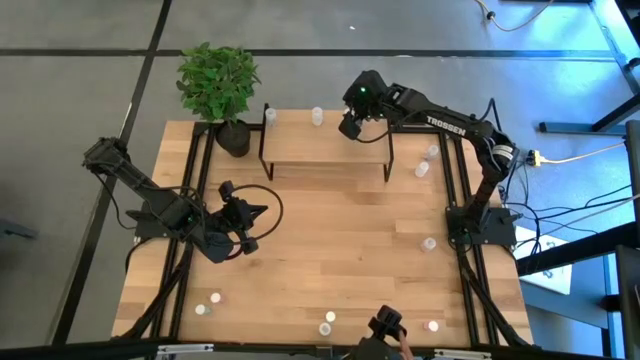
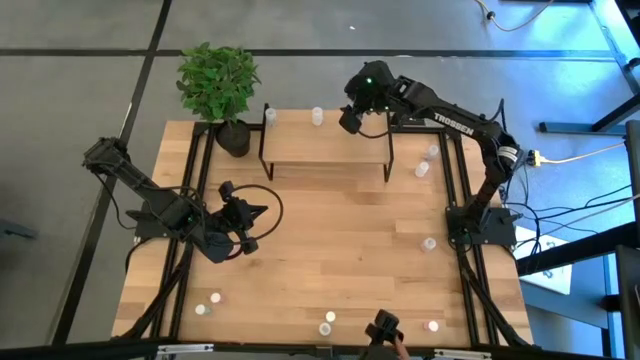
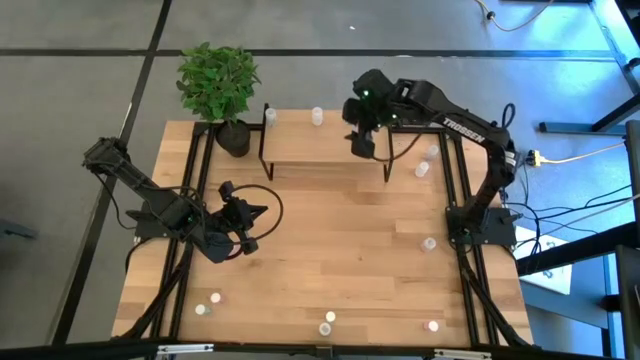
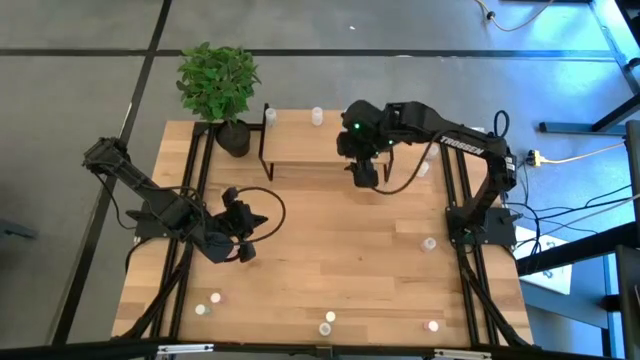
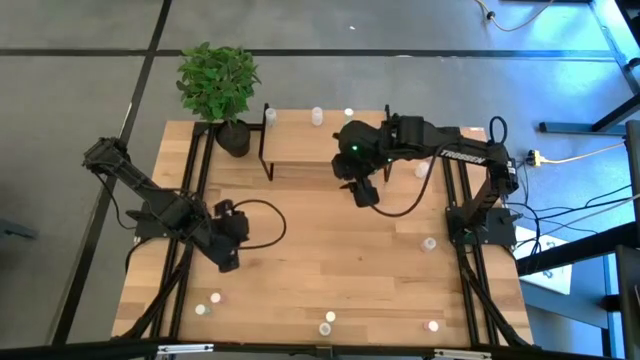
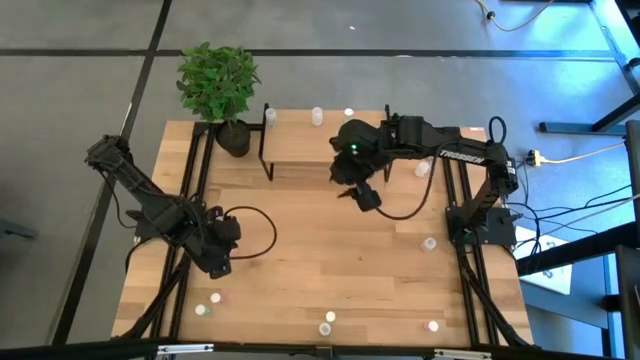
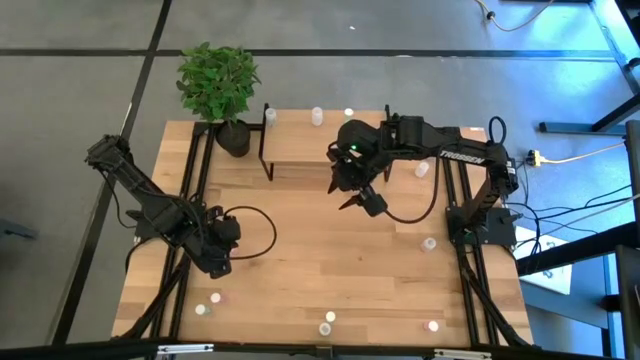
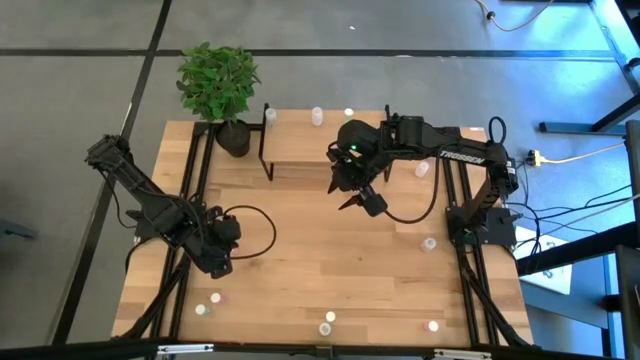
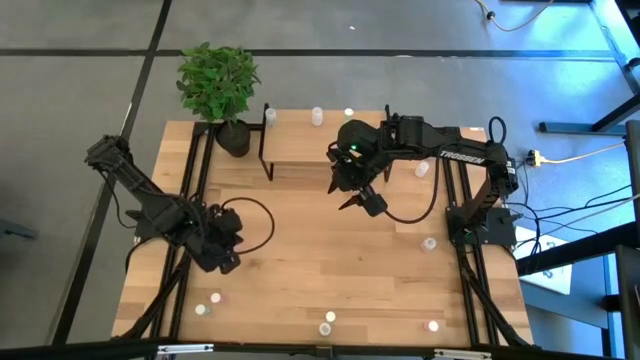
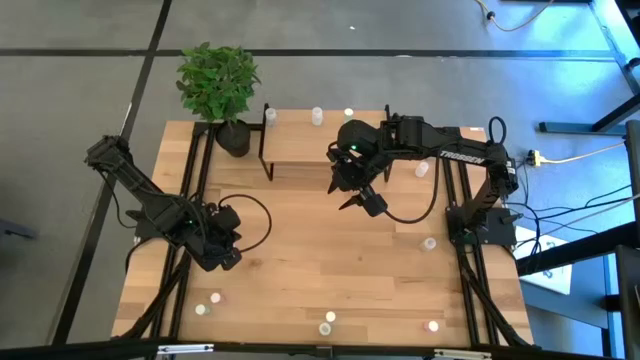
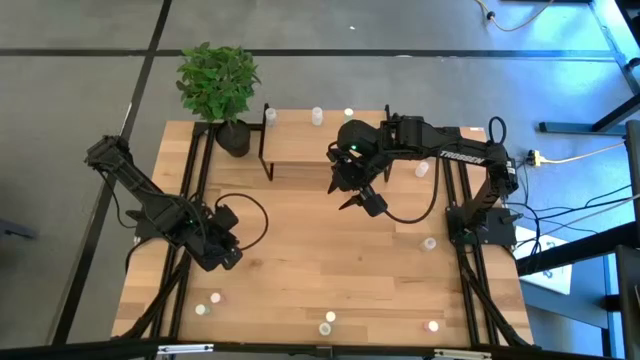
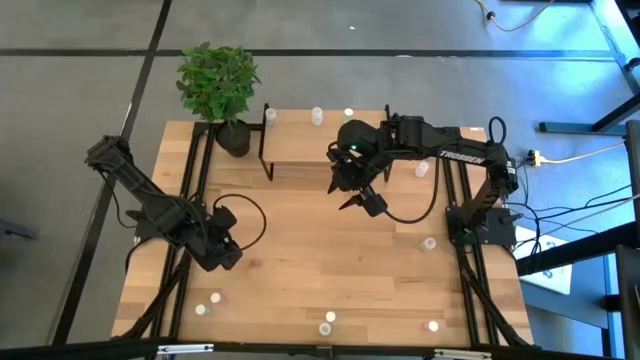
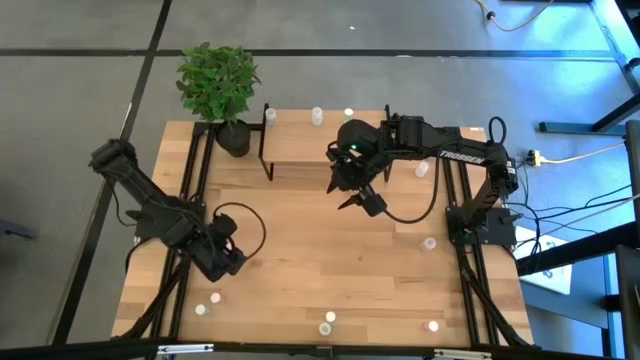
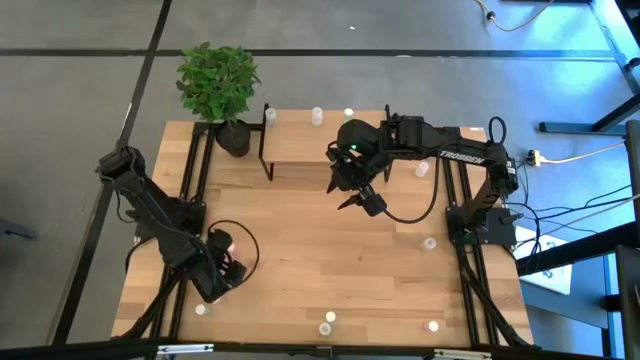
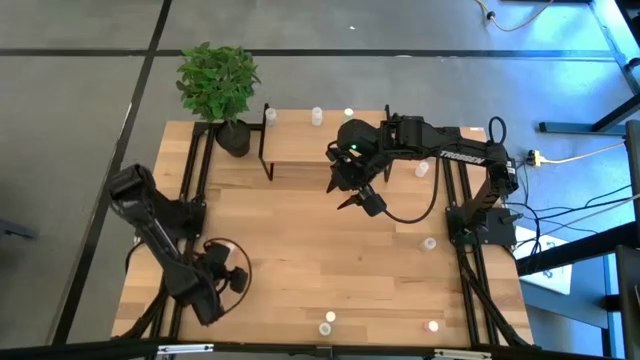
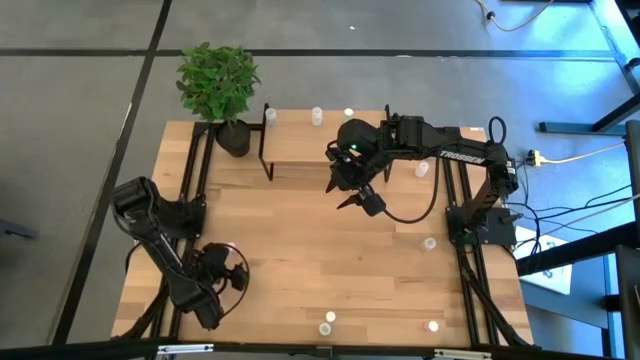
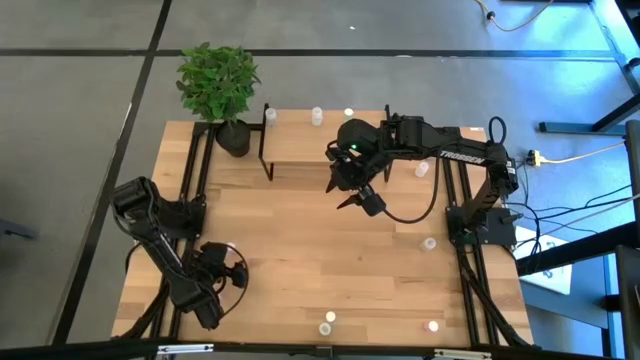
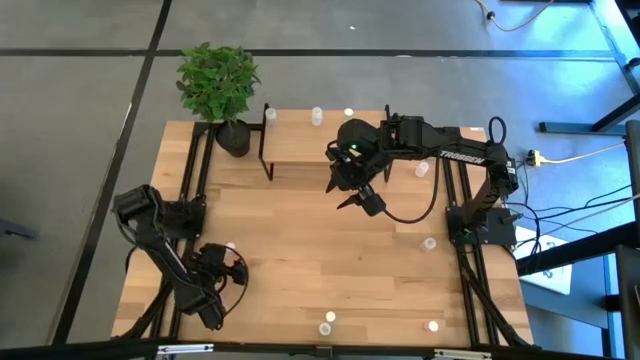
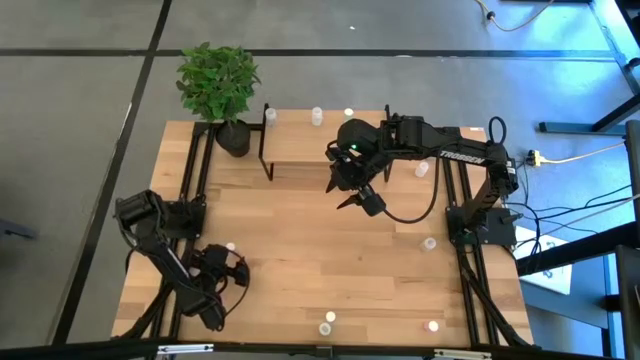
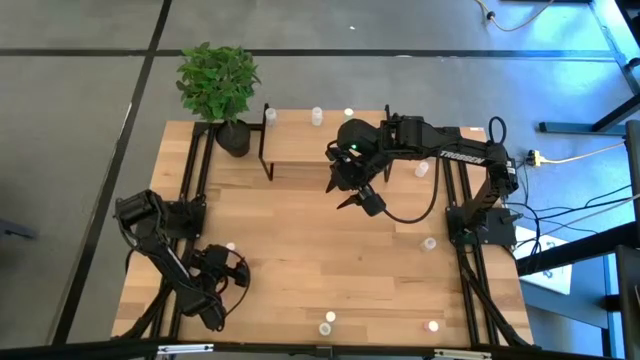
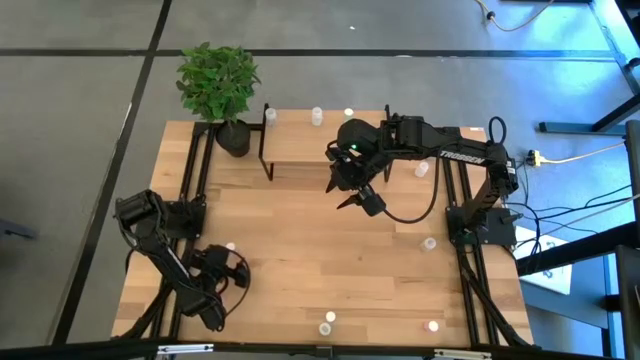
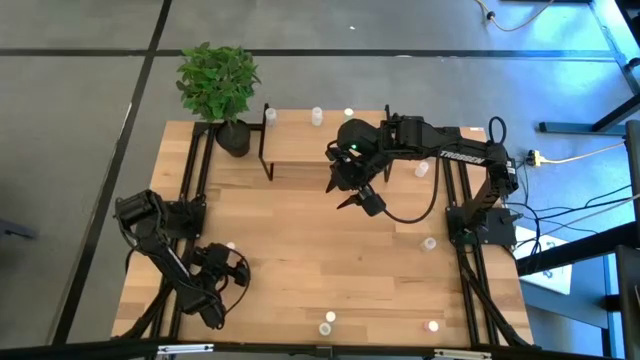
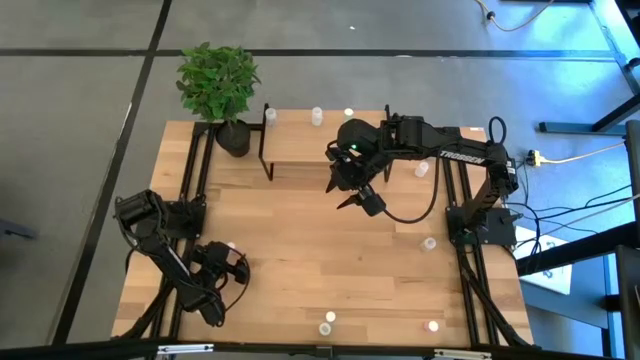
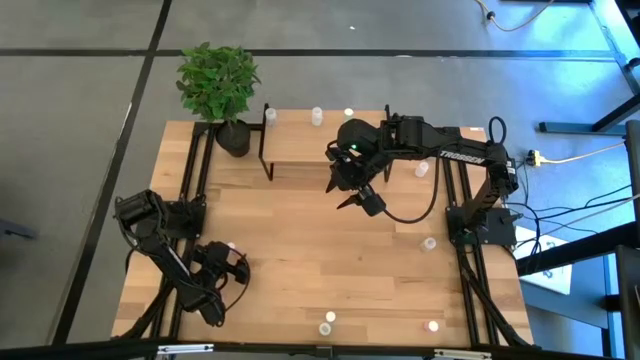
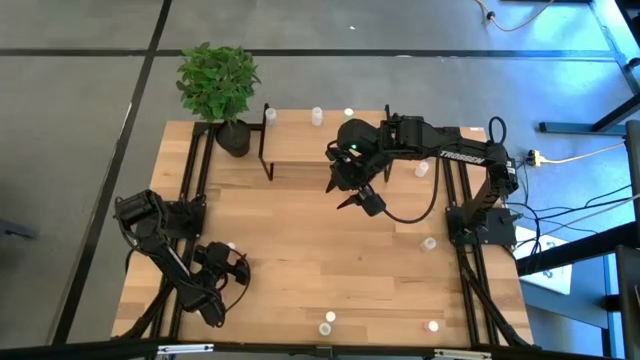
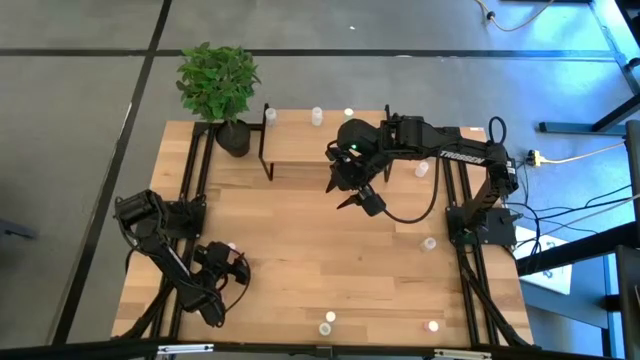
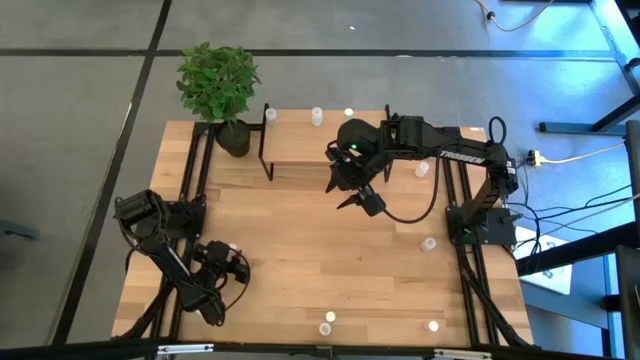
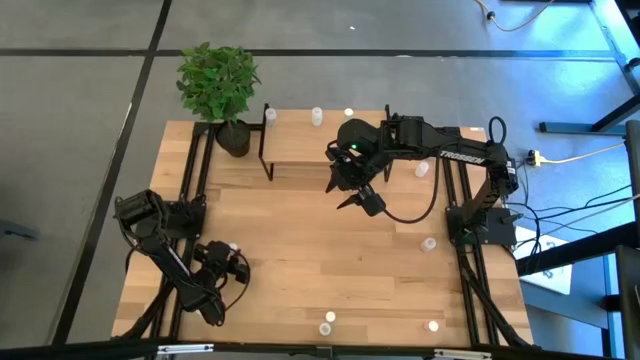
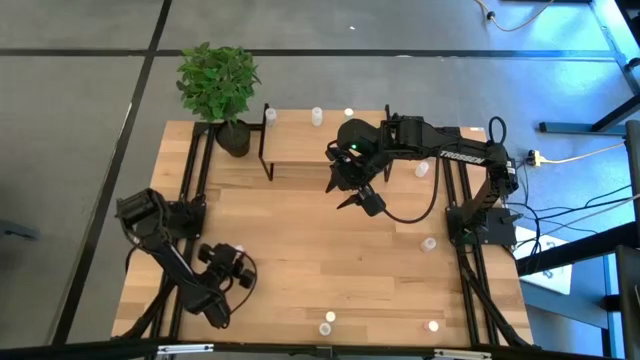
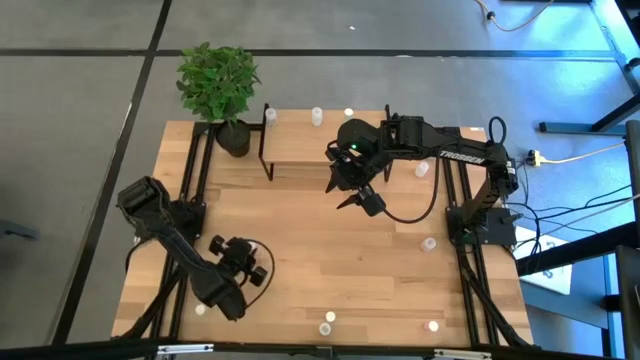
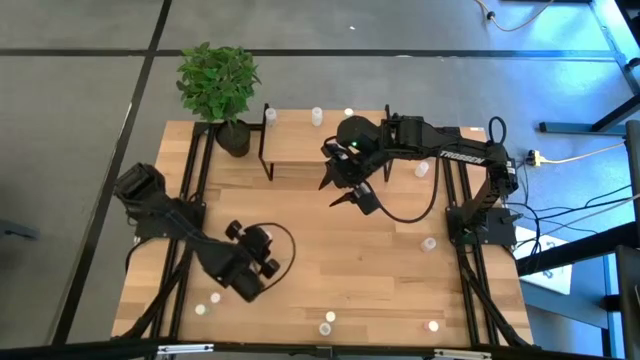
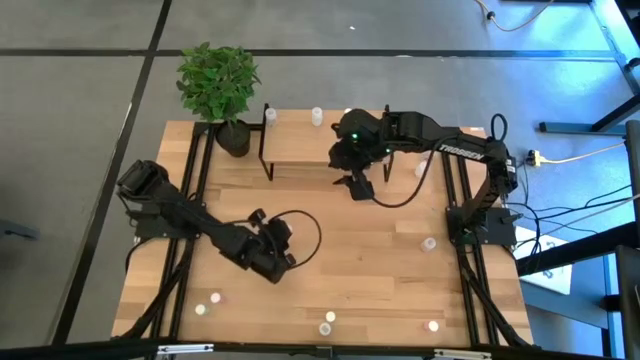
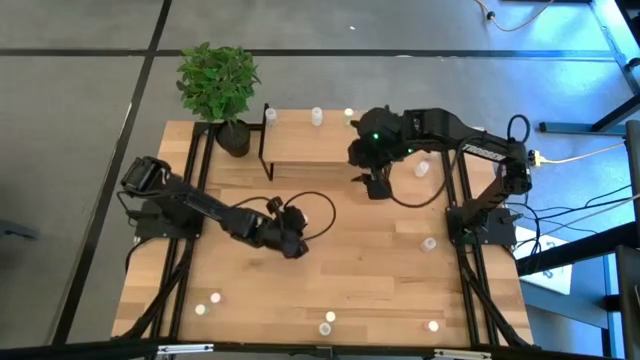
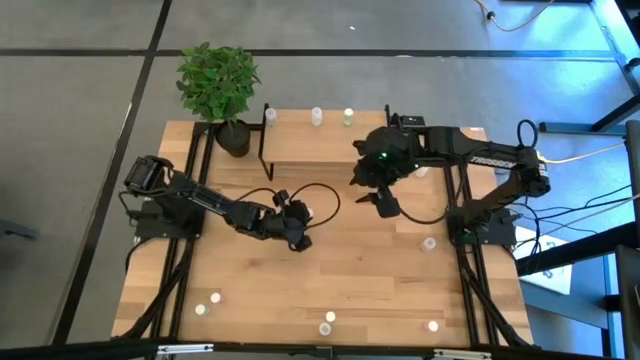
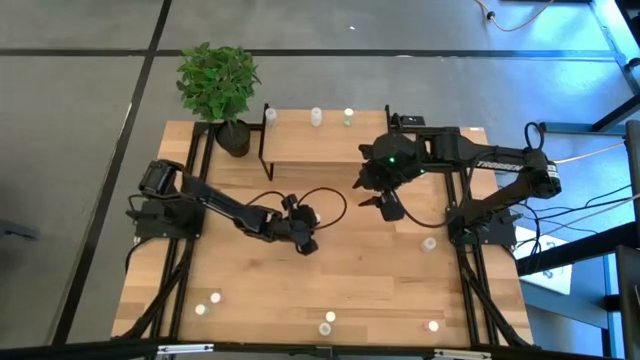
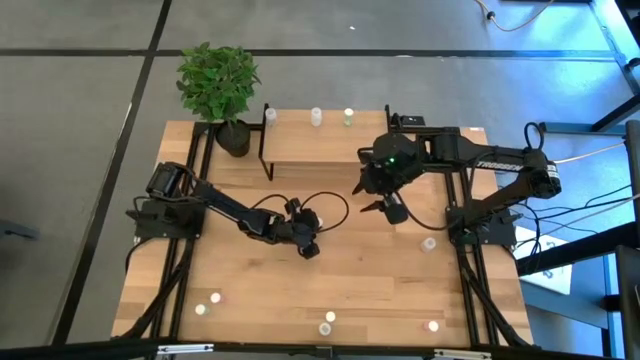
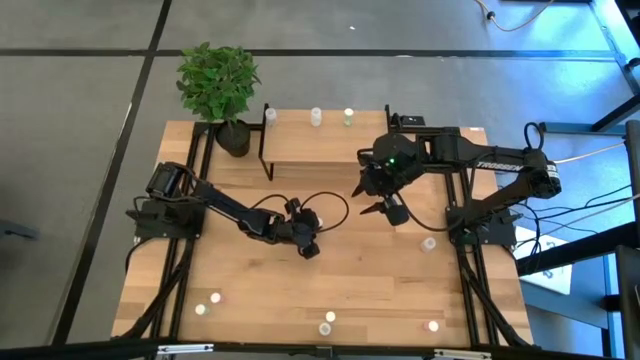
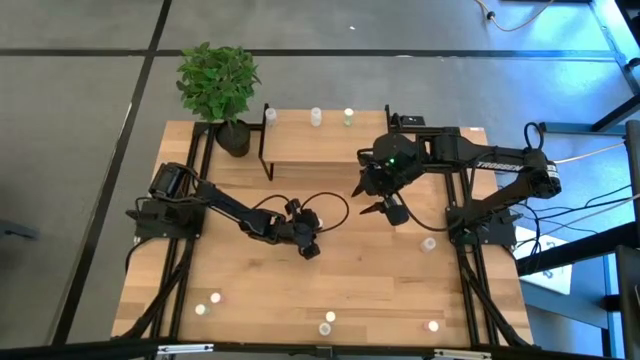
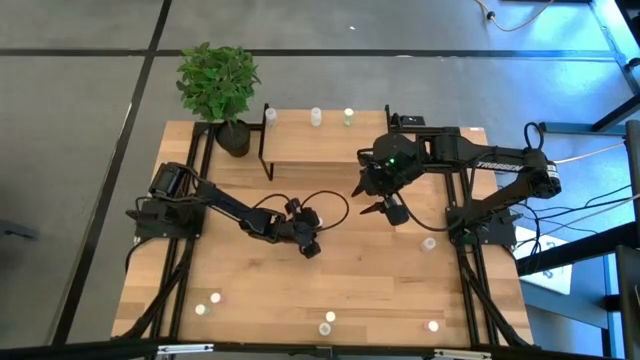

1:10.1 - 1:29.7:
Task: Pick and place medicine bottles onto shelf by color
Put the top left pink pill bottle on the shelf
